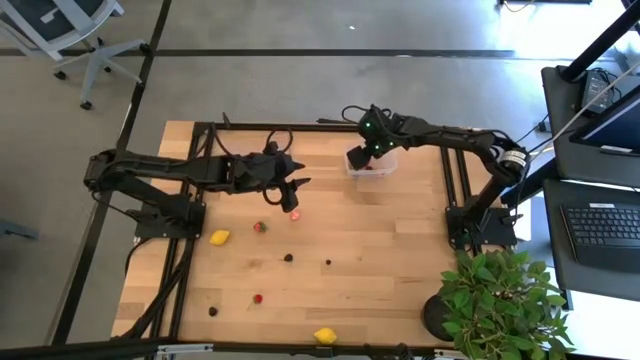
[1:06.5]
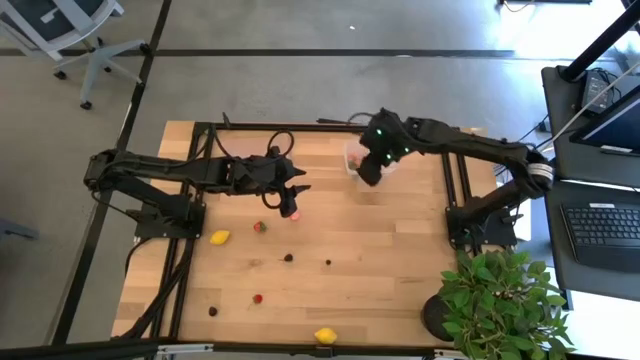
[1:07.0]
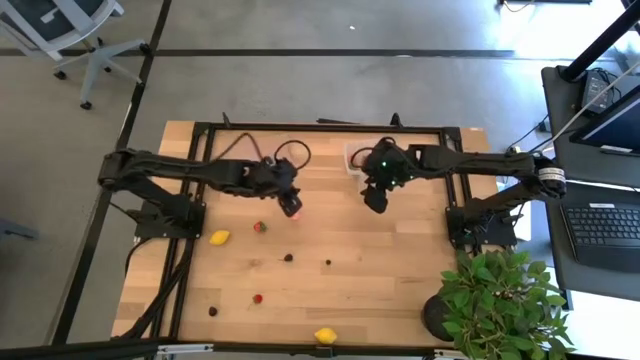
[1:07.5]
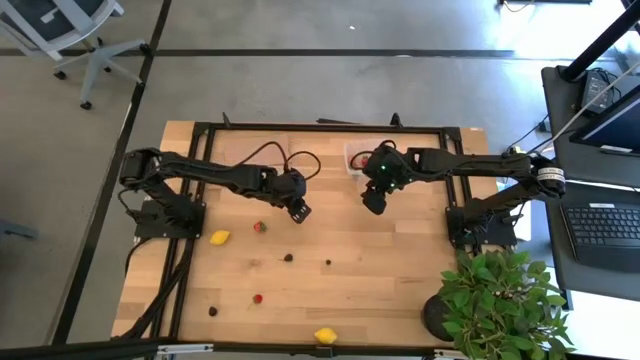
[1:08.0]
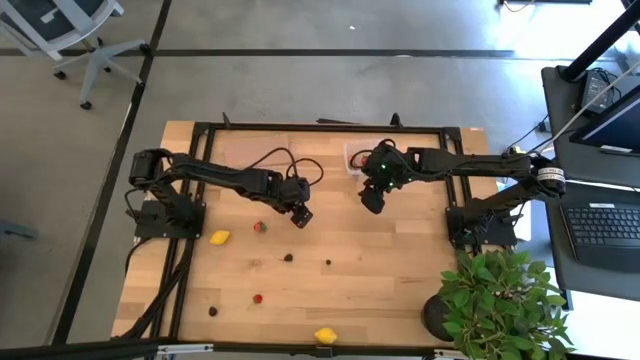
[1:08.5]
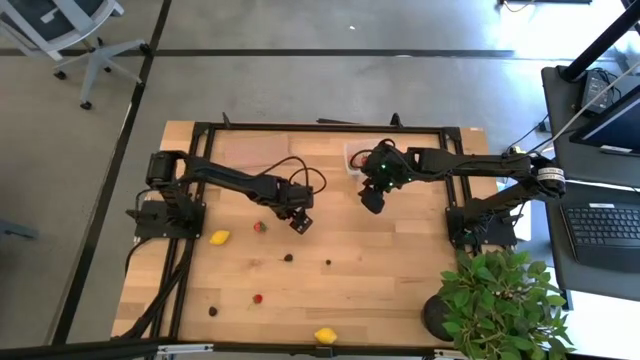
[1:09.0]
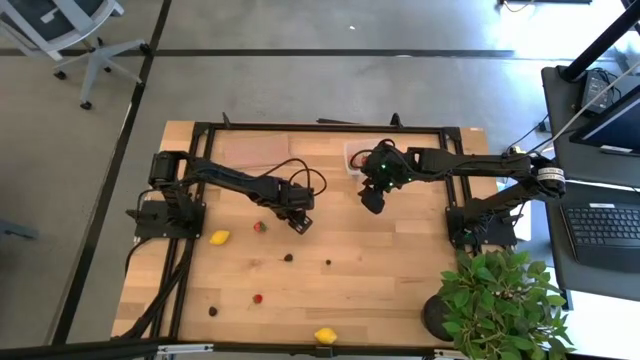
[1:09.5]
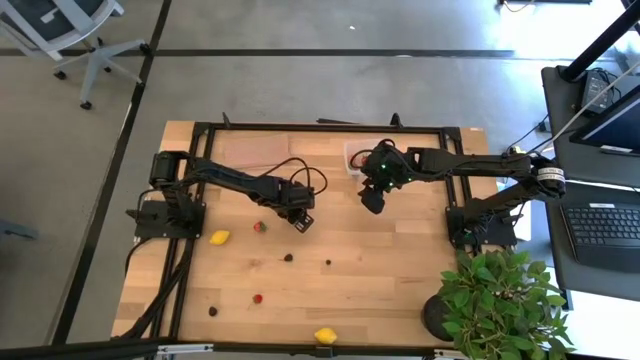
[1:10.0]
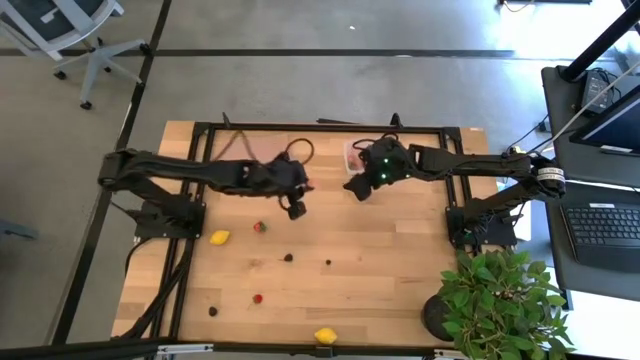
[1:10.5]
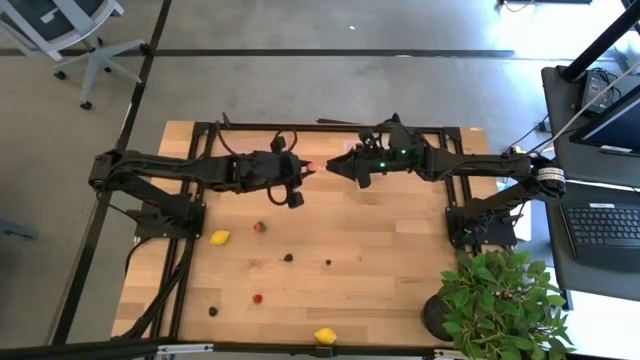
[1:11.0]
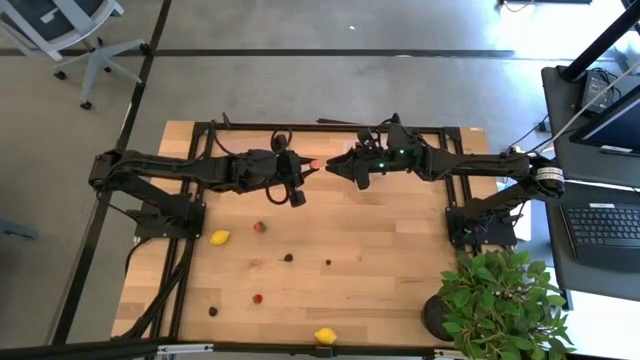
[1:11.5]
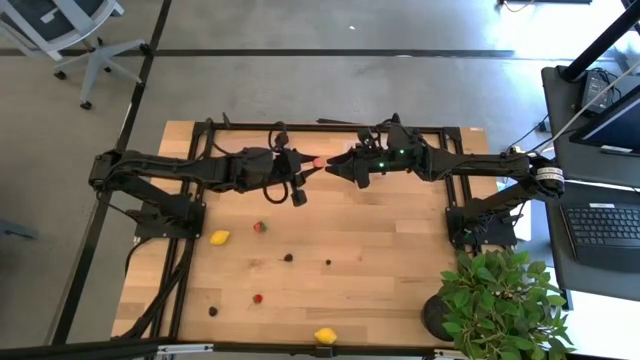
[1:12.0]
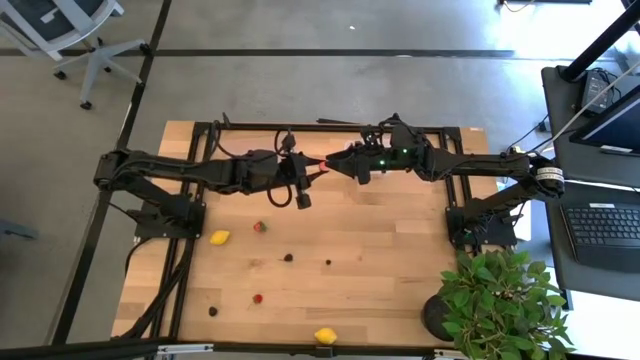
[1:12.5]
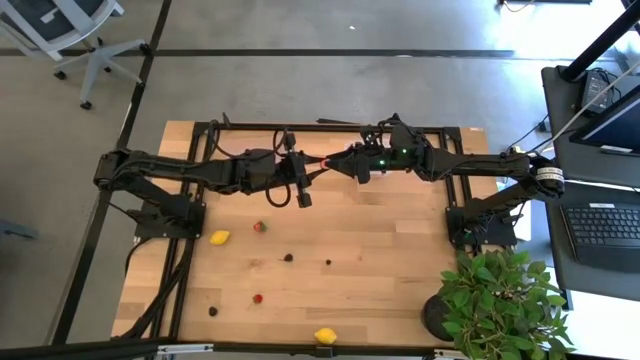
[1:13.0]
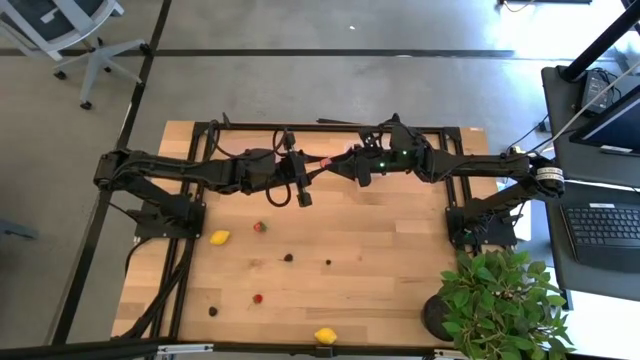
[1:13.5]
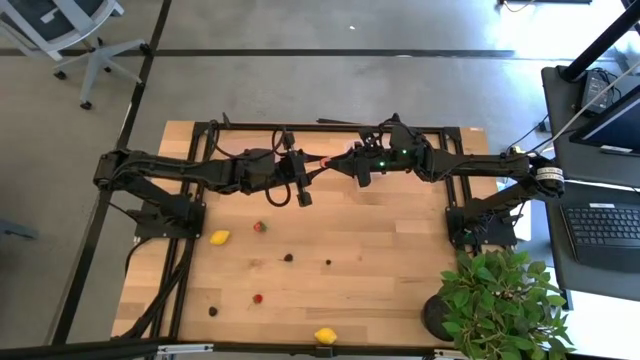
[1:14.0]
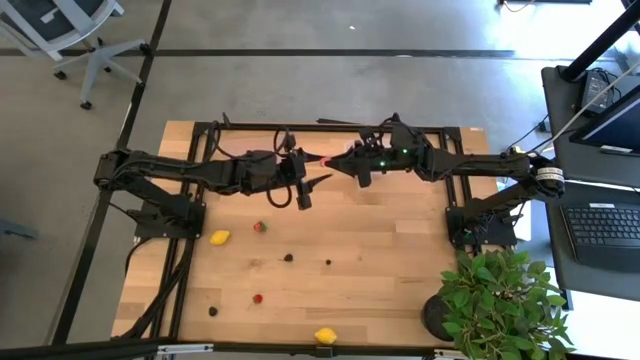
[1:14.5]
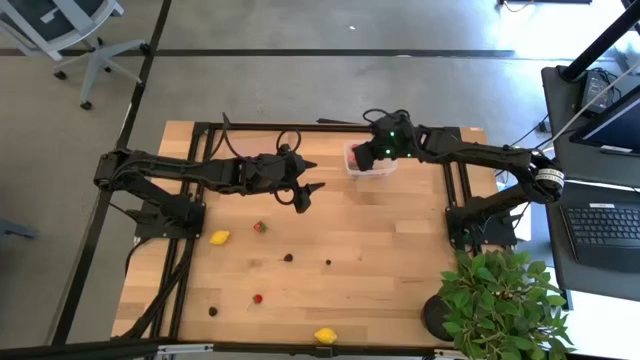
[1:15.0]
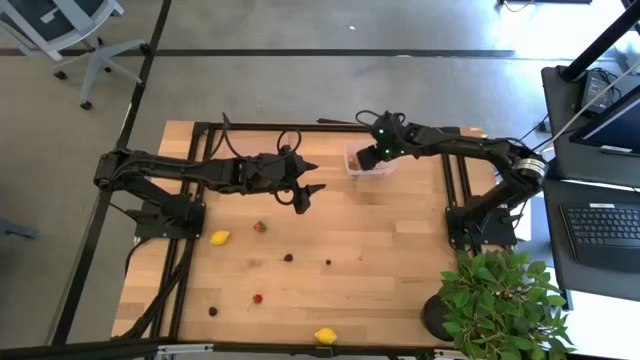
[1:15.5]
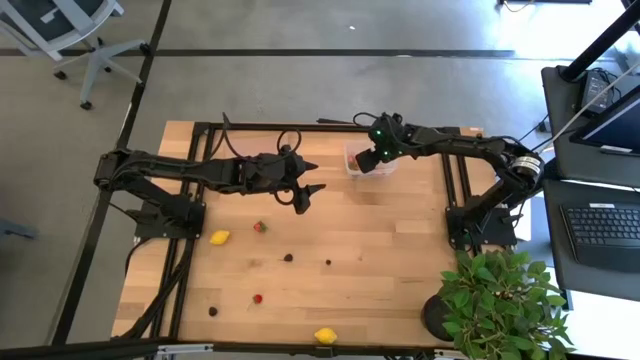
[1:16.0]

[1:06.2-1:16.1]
Task: Pick and placing Produce into tupperware
Put the peach into the transparent bin

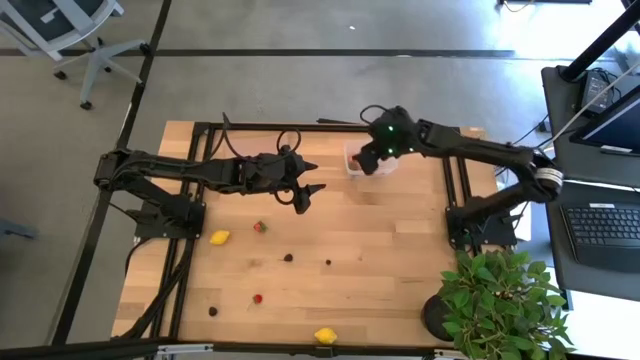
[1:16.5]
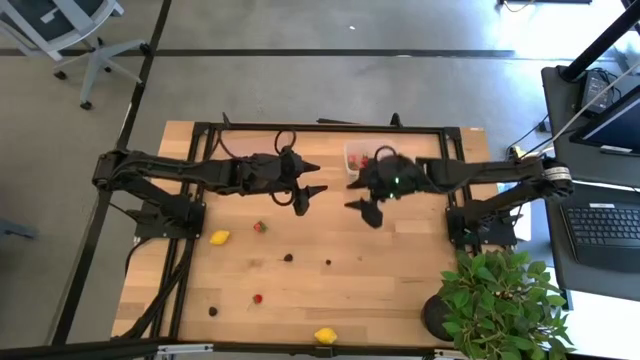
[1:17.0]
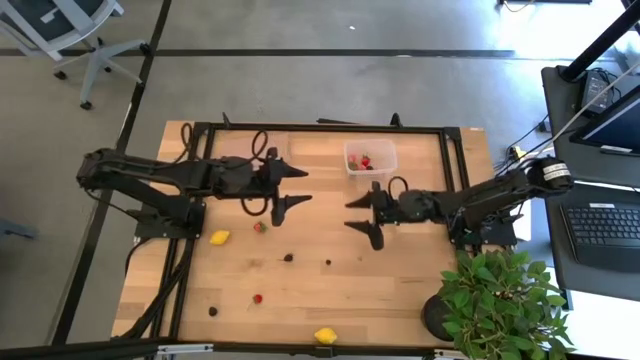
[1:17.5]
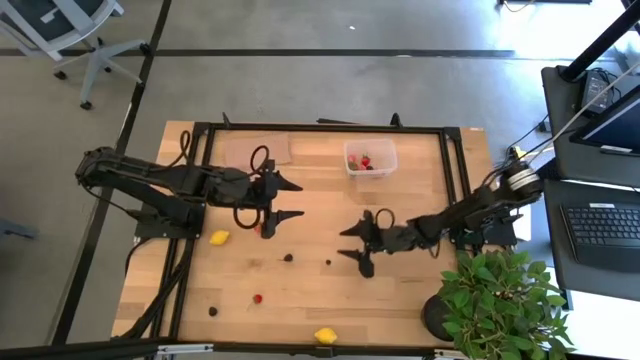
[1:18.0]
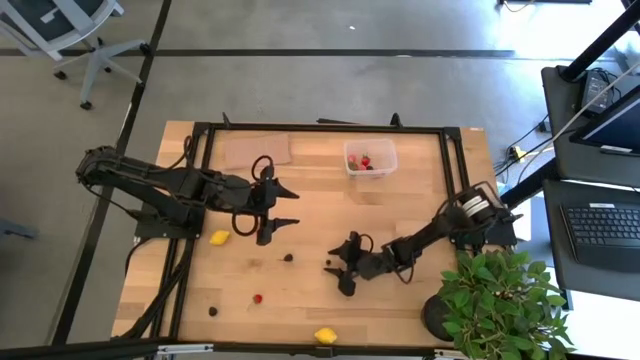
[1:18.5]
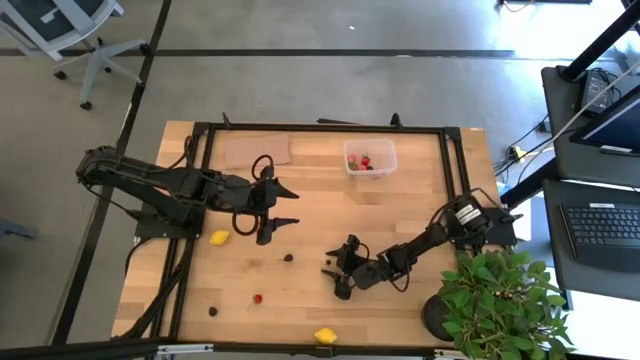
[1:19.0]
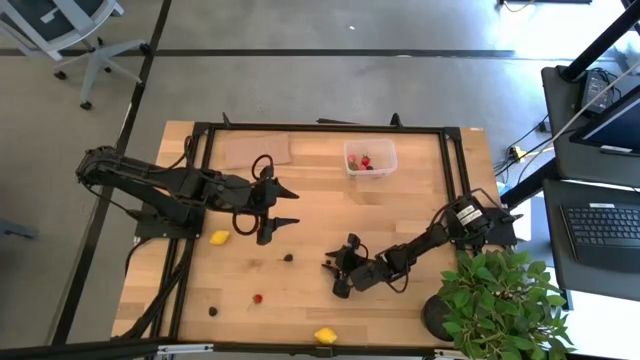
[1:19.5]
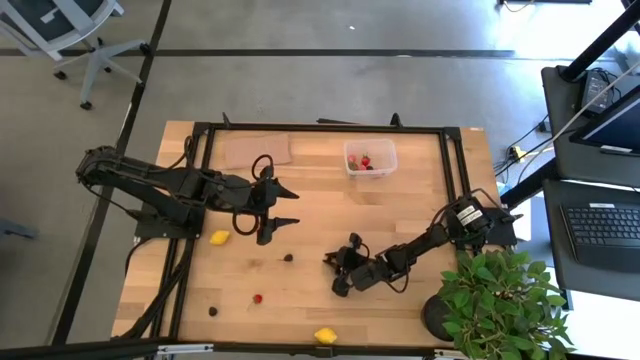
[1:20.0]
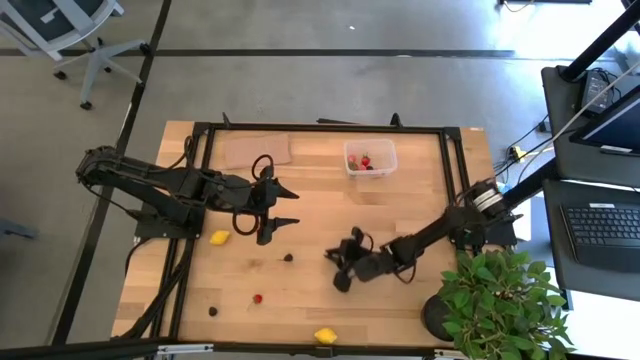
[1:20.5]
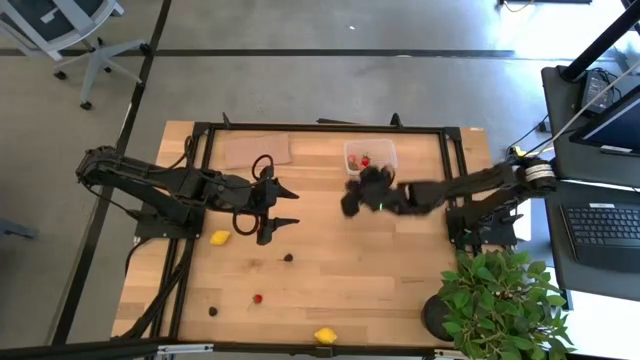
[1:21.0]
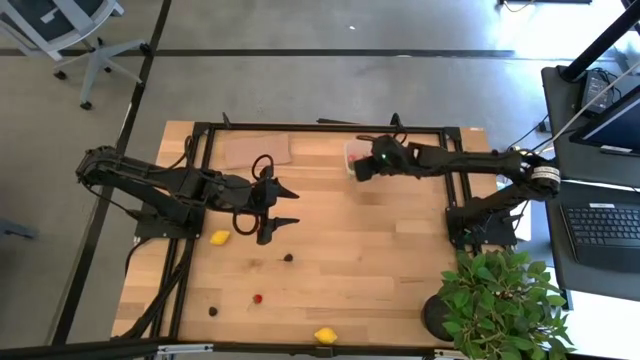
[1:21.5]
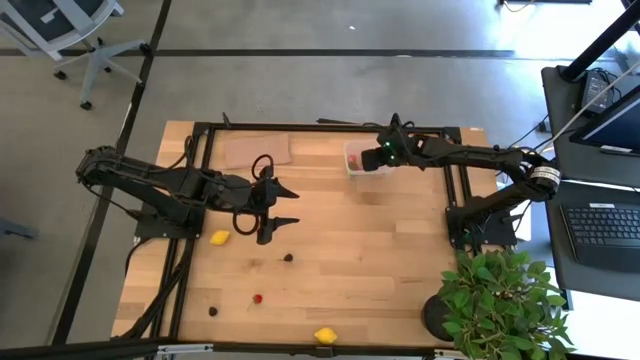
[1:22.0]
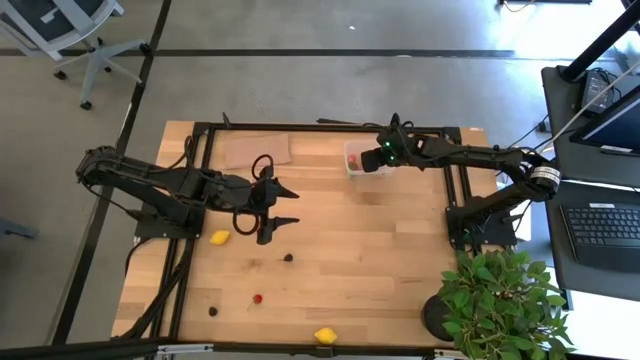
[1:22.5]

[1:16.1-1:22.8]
Put the blueberry into the transparent bin

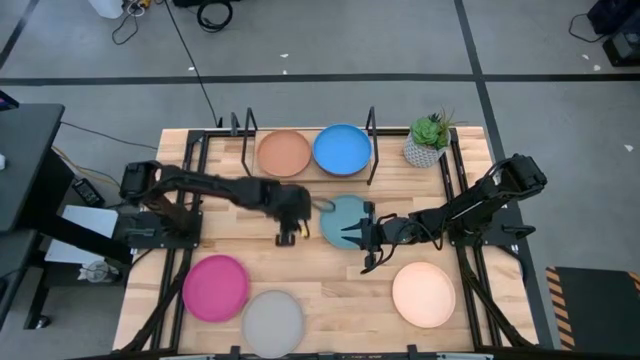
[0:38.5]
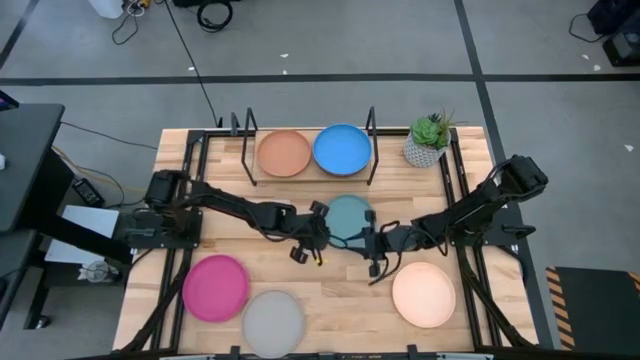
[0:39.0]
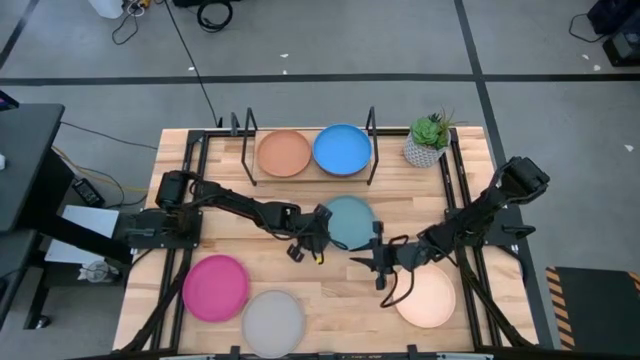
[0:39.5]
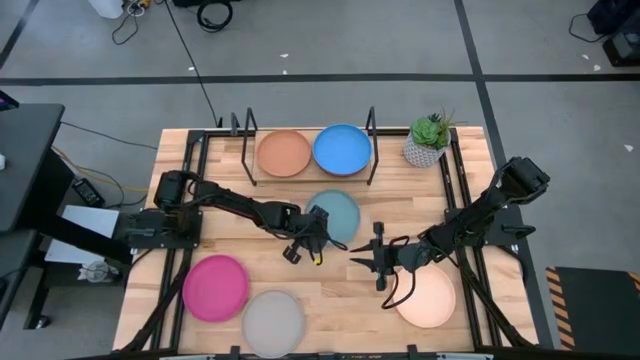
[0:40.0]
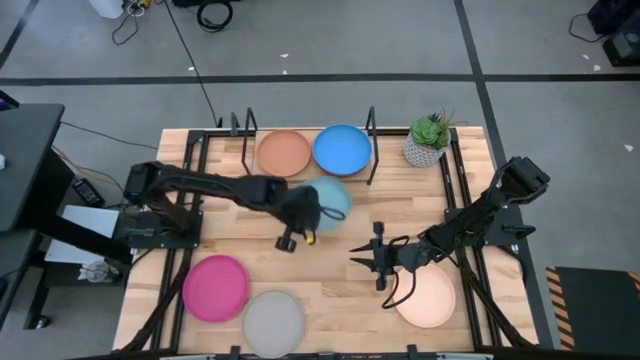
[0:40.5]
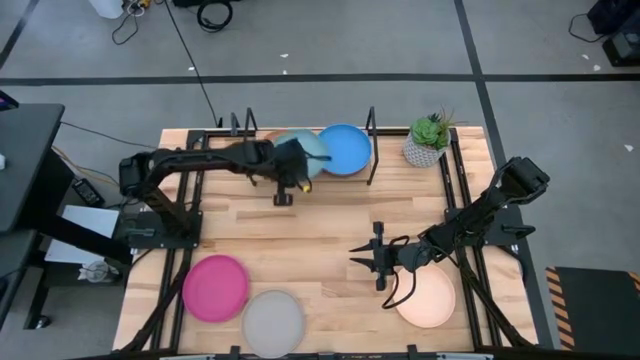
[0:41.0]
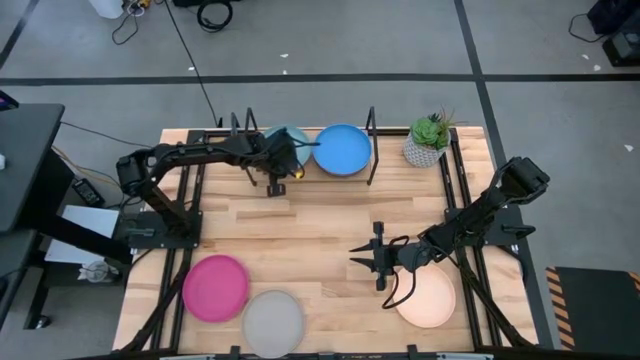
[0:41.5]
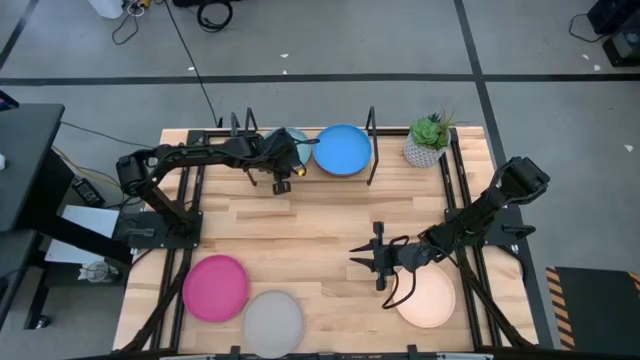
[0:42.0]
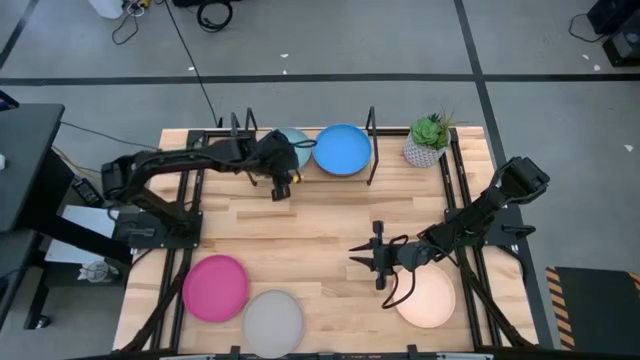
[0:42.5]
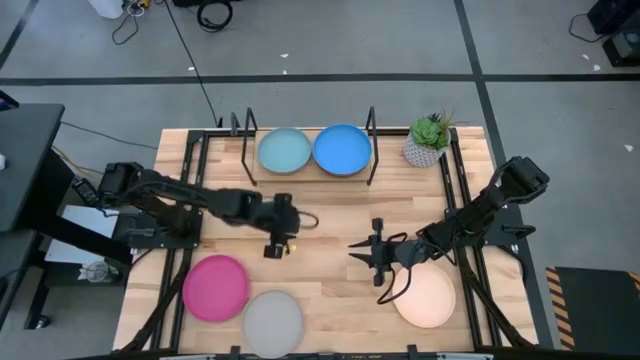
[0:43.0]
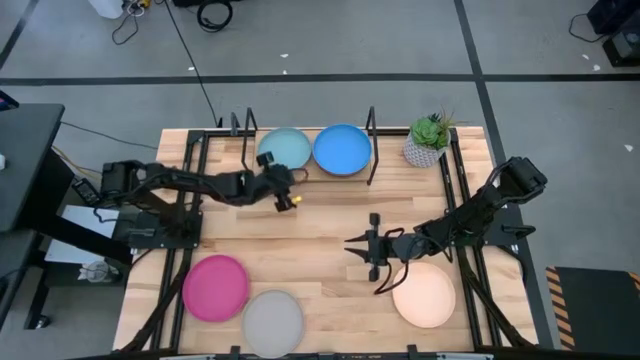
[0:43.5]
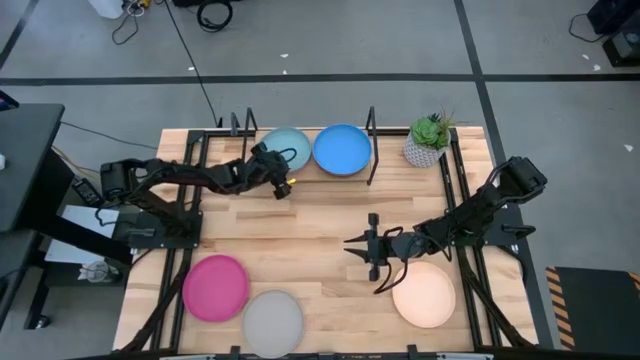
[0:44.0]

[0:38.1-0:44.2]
Task: Place and stack plates onto a shelf
Stack the light blue plate on top of the brown plate on the shelf
